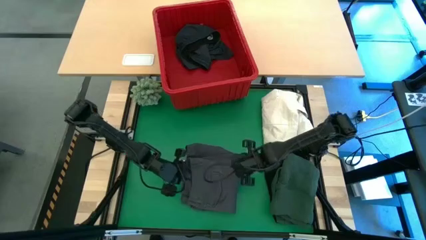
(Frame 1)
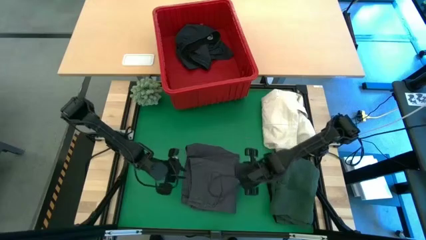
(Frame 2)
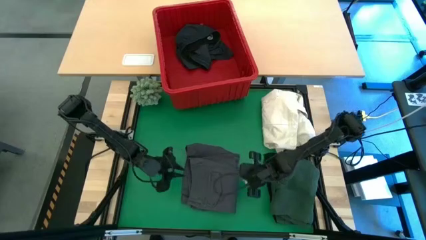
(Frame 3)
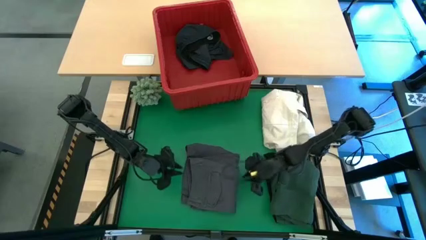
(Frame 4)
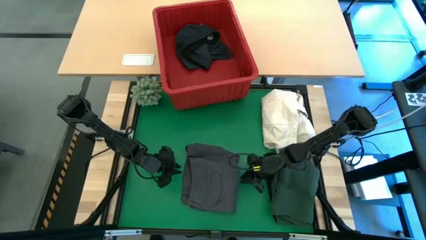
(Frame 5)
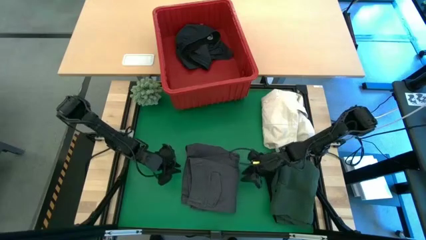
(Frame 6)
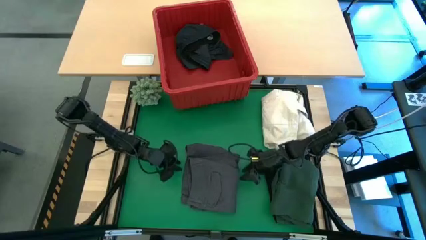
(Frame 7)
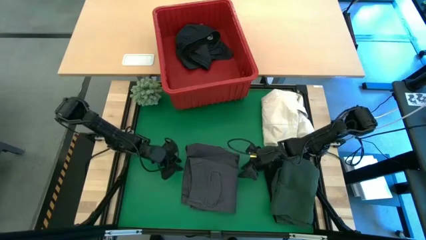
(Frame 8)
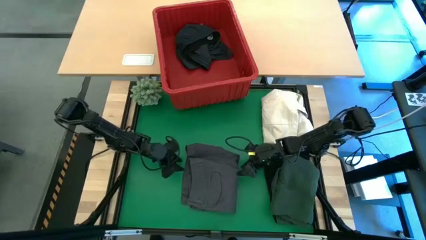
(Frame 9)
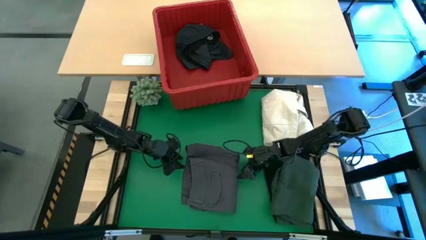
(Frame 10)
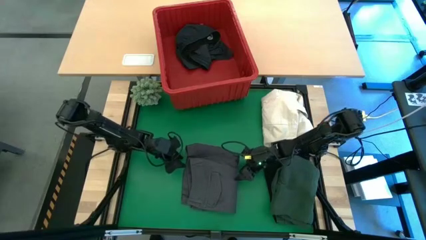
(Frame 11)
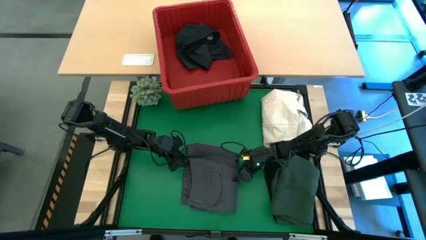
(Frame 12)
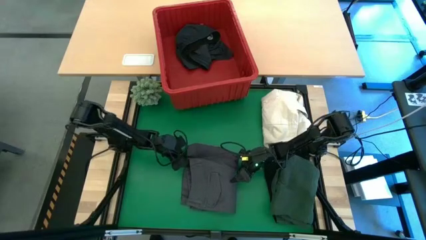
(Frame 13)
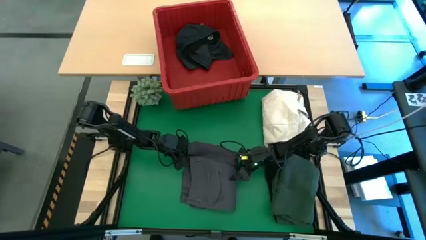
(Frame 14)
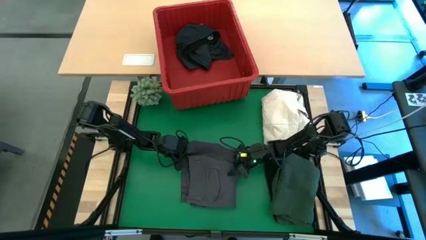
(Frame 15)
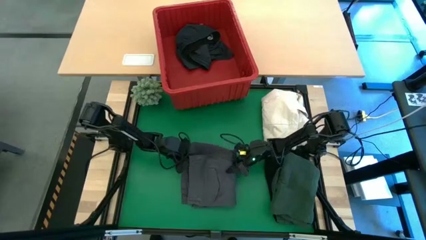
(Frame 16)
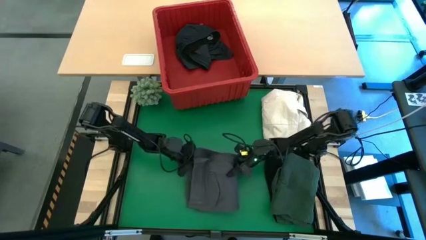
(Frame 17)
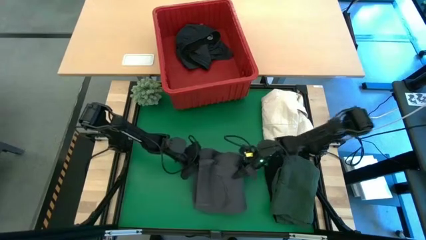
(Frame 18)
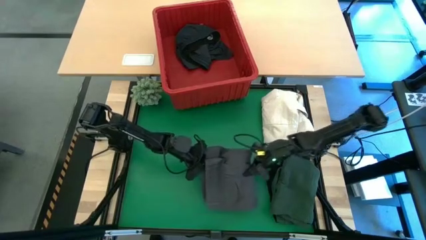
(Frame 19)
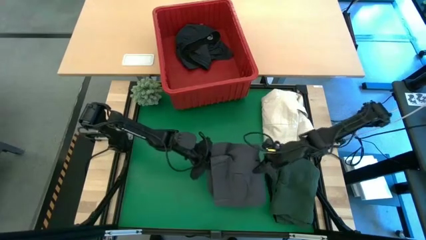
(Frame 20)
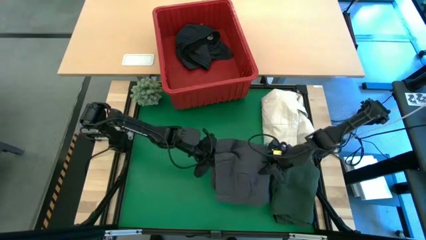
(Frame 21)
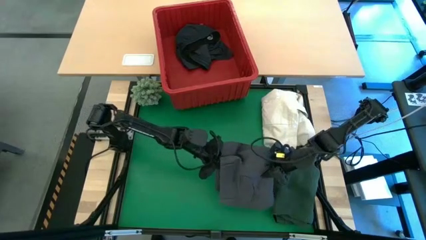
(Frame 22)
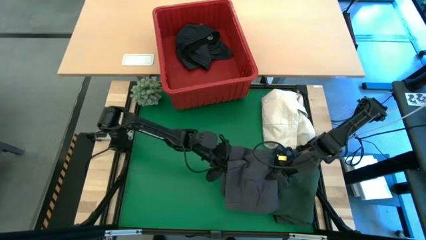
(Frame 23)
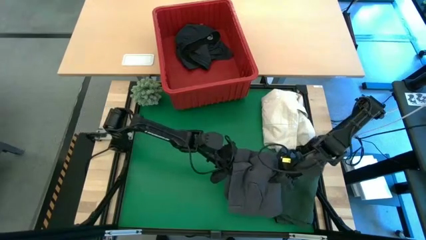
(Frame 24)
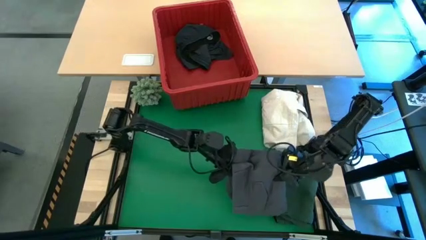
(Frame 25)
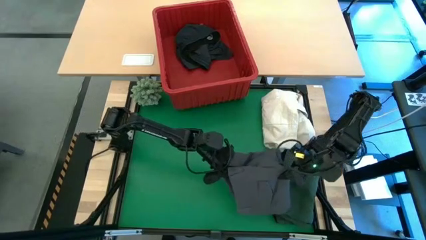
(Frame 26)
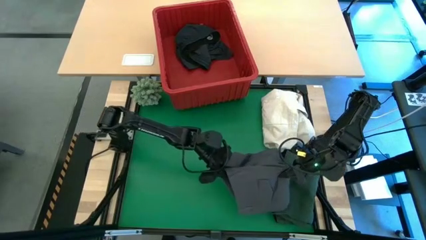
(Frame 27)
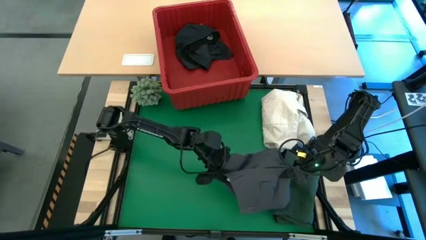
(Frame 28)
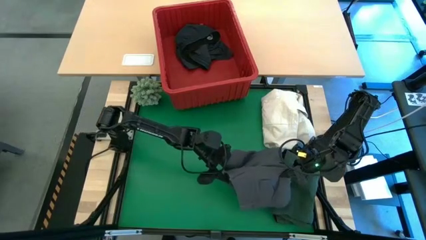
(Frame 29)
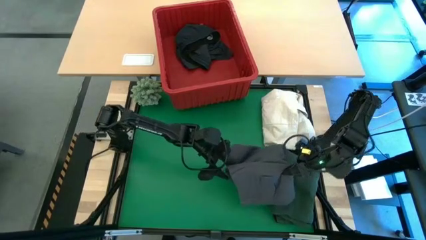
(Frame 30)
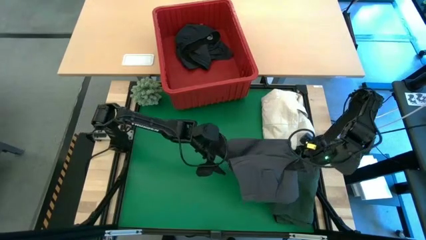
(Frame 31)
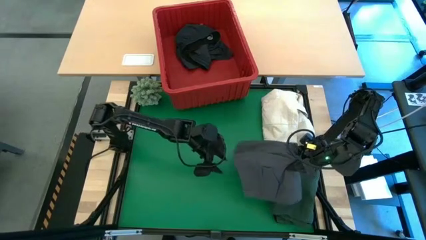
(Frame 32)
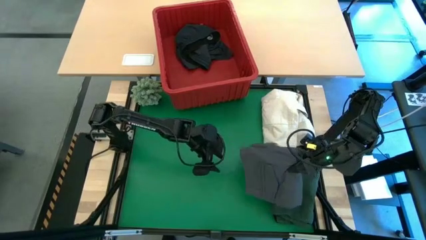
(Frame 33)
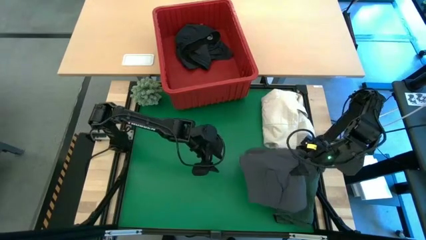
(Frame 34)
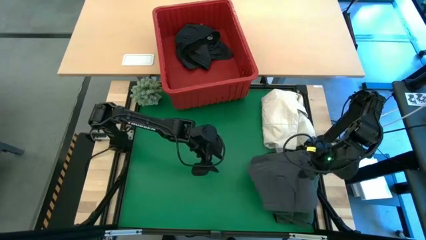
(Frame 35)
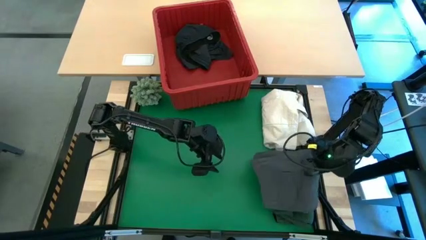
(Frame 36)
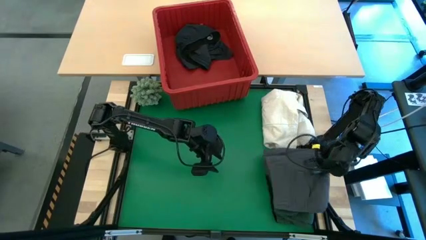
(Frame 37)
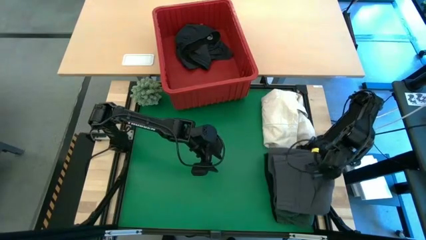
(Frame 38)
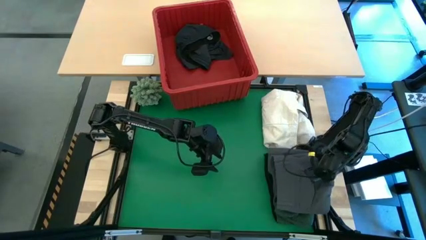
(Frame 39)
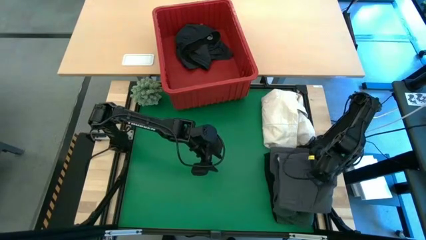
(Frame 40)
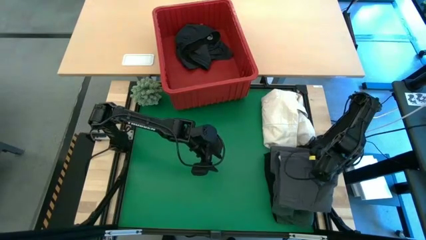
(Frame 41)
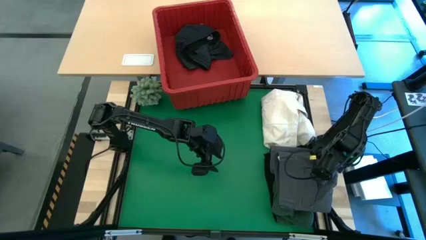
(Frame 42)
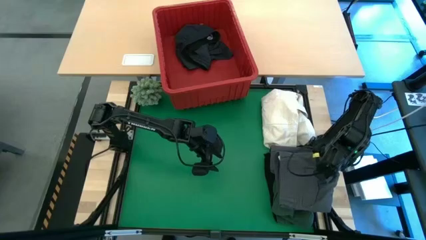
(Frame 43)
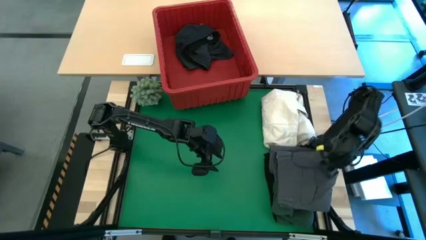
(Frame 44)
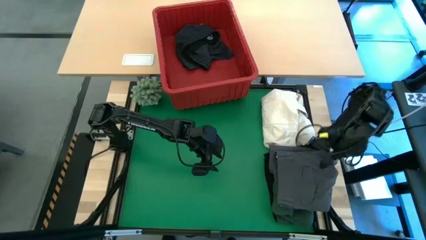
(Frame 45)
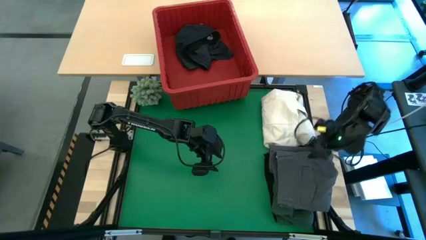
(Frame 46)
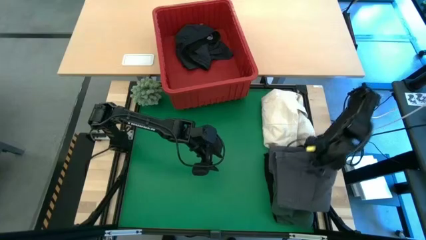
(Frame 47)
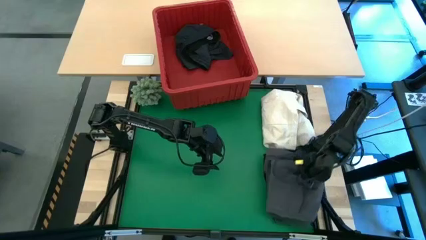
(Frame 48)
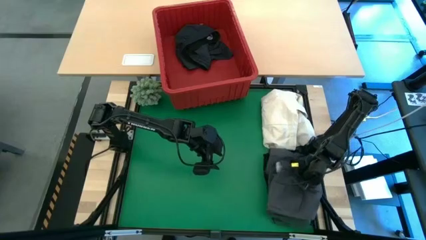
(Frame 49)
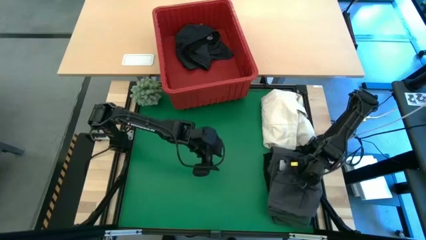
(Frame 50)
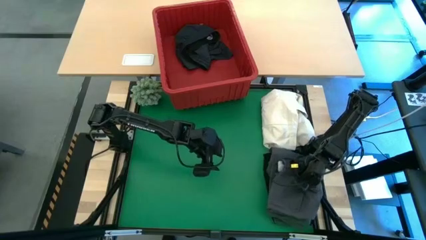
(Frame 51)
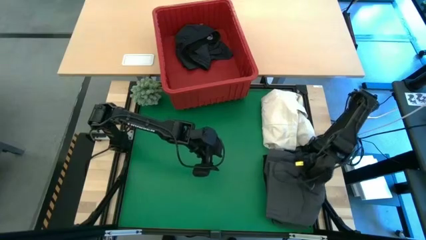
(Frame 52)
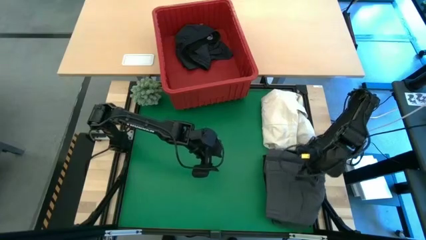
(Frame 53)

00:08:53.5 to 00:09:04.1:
Task: Fold laundry
Stack the gray folded pants on top of the green folded polo shirt

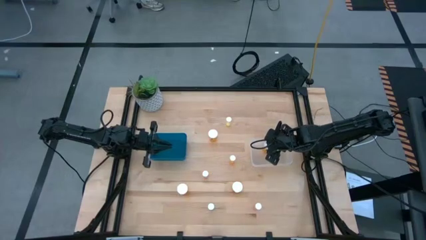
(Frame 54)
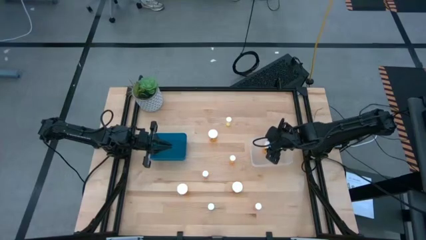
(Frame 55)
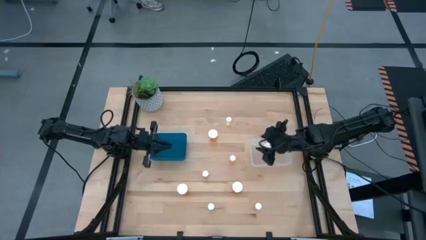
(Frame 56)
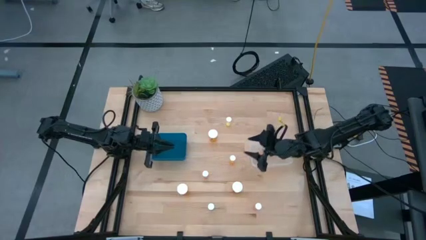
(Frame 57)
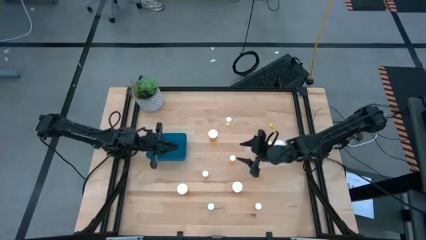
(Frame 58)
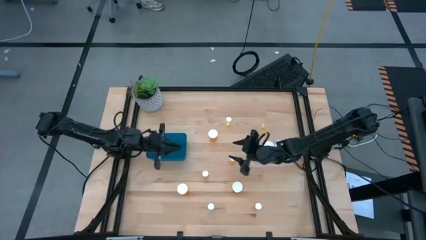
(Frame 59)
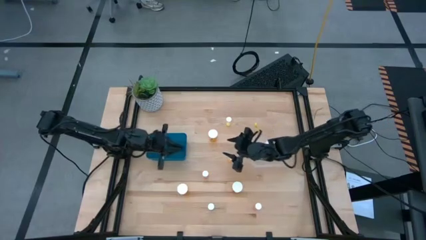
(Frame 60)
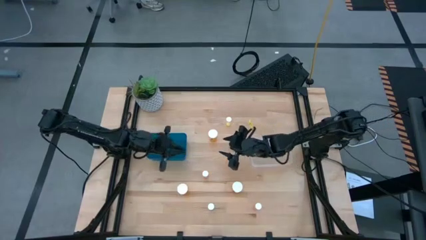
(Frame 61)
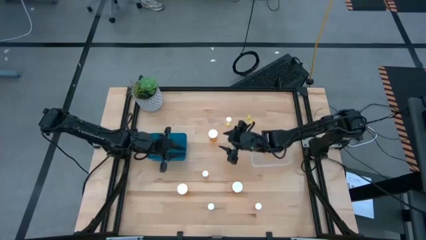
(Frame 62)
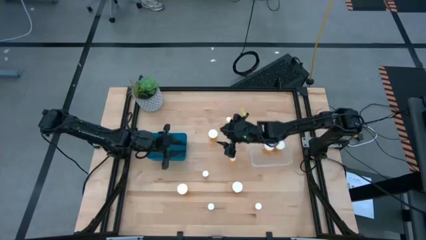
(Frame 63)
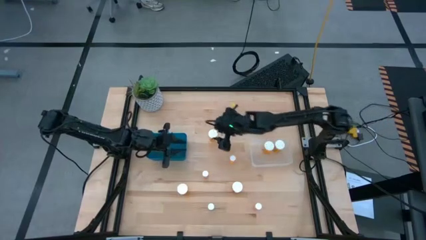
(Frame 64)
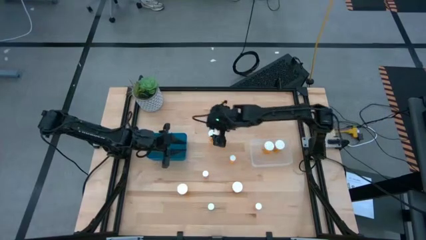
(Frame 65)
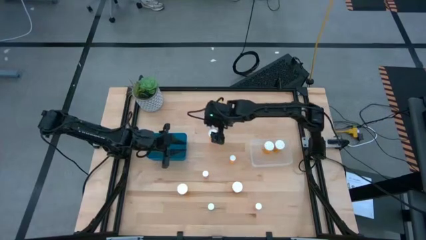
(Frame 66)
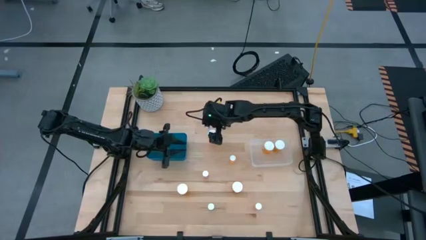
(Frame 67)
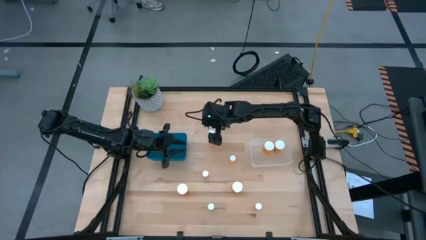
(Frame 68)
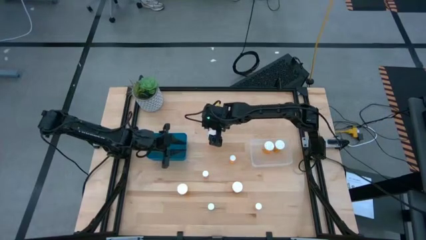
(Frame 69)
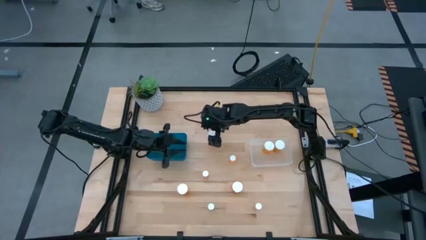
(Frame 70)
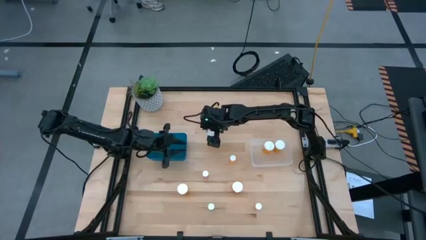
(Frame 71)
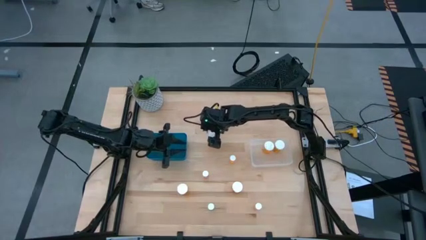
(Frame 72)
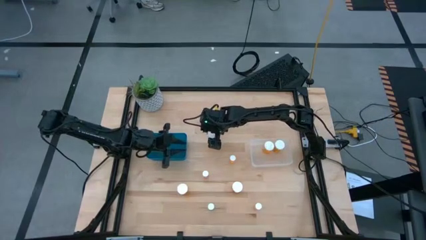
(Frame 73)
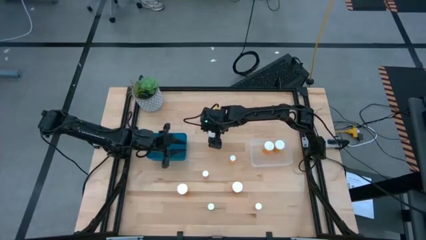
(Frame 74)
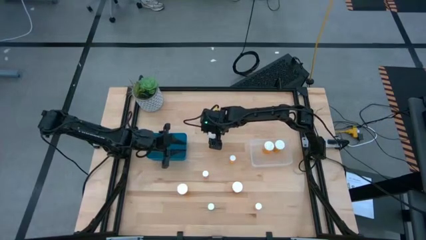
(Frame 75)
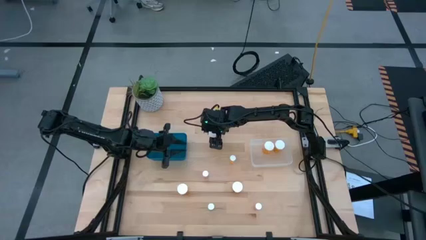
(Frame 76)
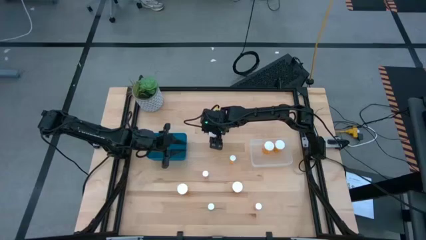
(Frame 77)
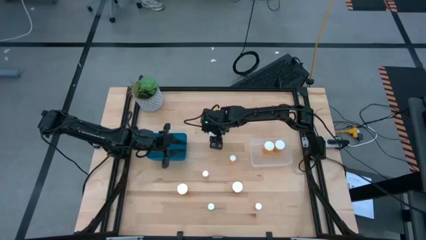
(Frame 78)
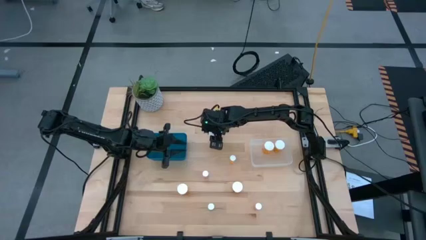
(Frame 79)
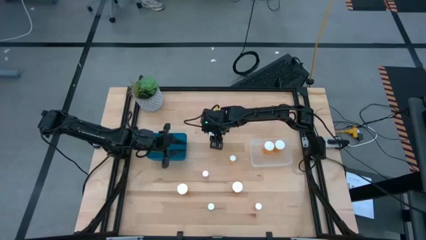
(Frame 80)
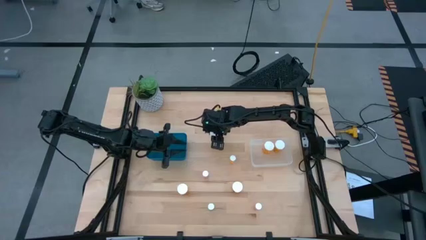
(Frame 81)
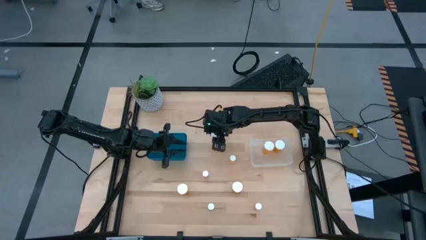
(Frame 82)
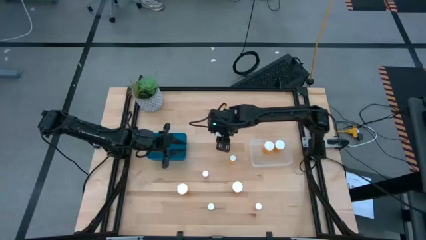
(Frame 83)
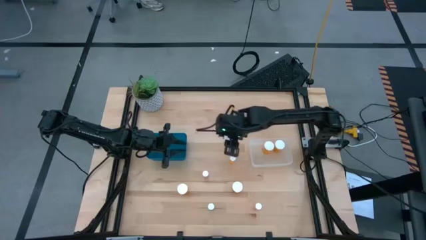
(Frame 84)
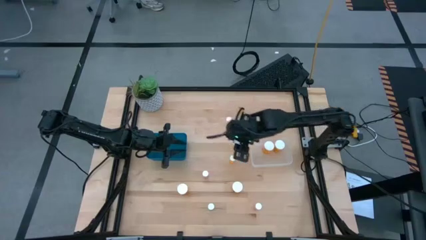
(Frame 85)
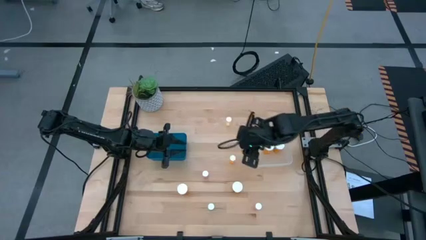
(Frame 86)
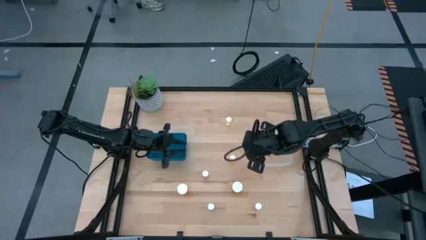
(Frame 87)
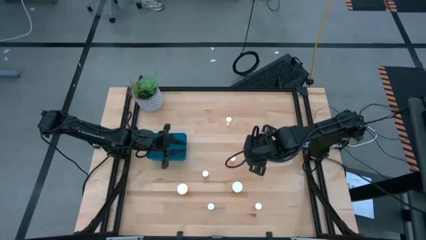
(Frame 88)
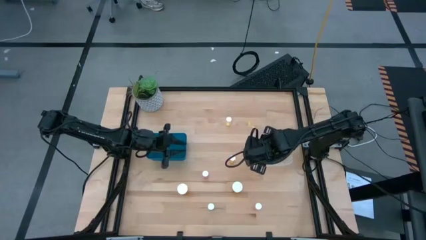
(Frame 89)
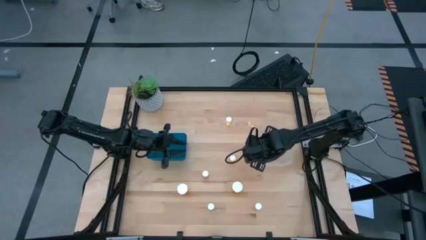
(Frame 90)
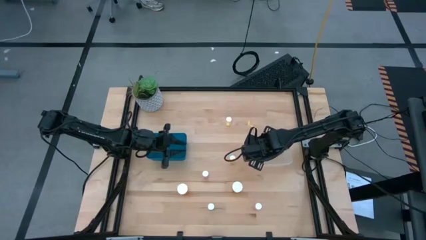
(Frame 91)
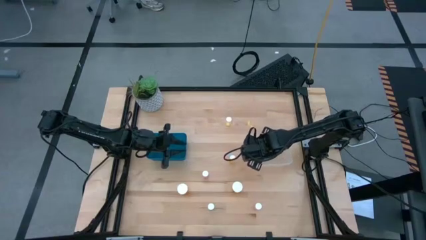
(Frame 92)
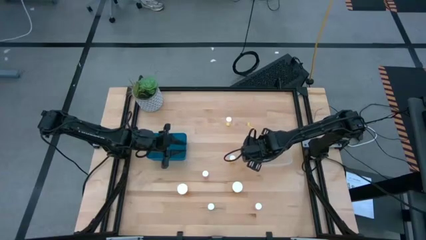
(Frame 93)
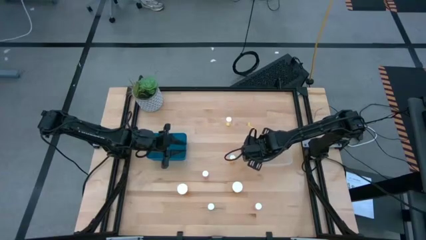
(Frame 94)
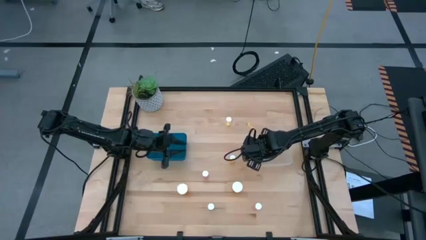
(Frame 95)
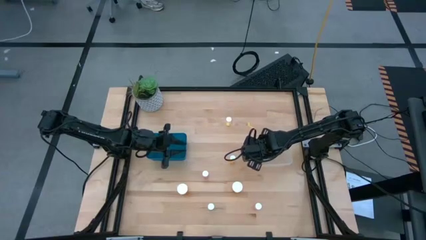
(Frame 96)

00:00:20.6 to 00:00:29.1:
Task: Pick and place medicine bottles into bin by pill shape (circle, oval)
Put the large orange pill bottle into the transparent bin
